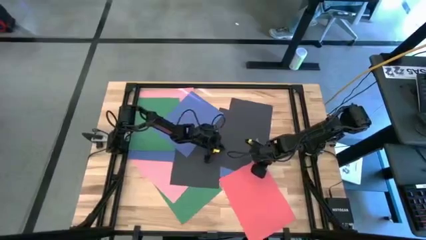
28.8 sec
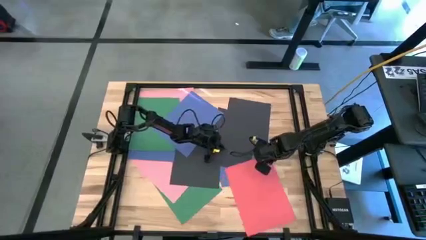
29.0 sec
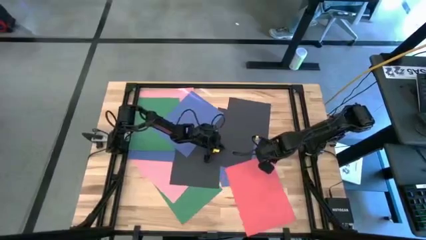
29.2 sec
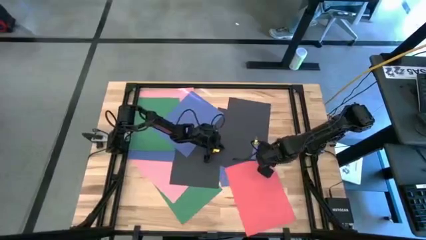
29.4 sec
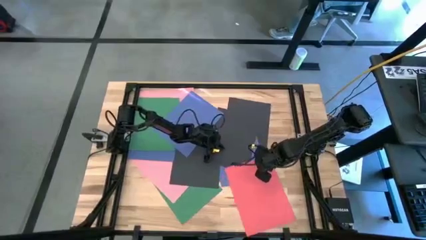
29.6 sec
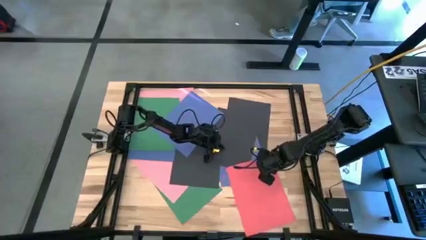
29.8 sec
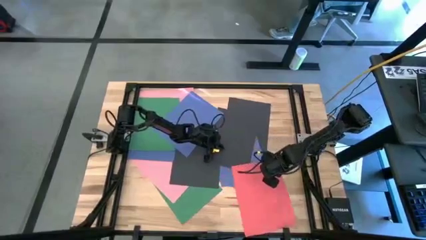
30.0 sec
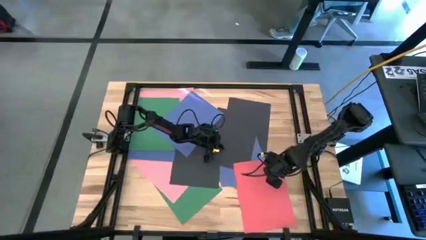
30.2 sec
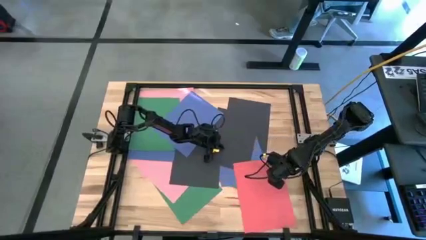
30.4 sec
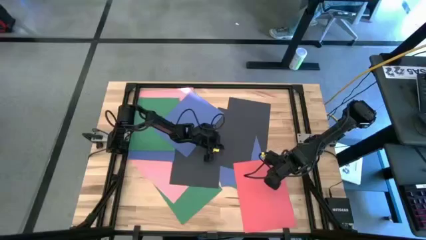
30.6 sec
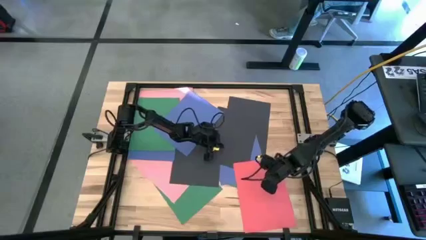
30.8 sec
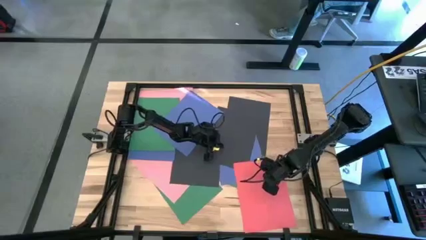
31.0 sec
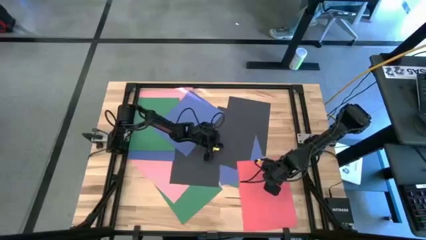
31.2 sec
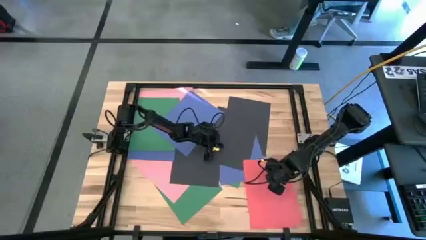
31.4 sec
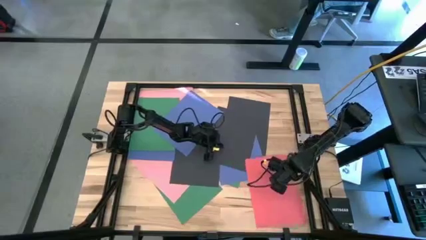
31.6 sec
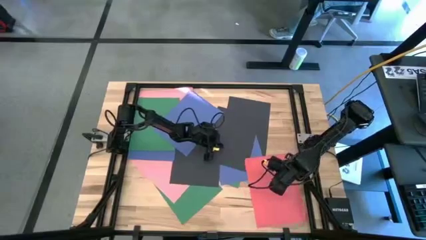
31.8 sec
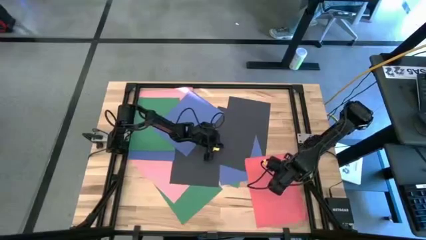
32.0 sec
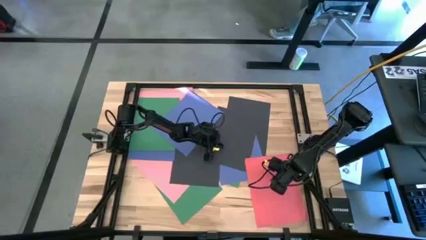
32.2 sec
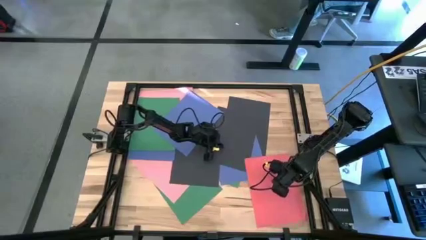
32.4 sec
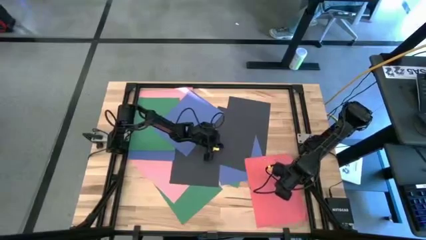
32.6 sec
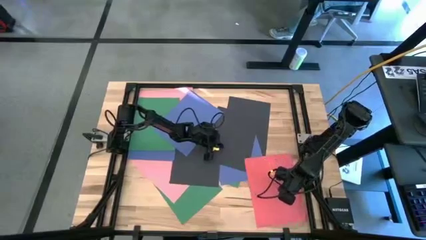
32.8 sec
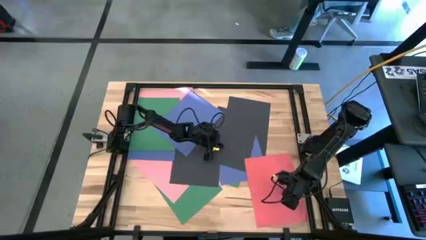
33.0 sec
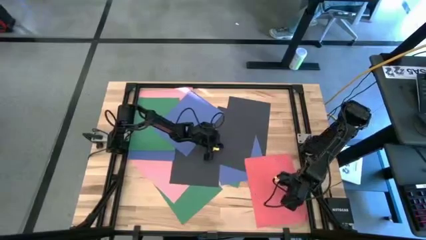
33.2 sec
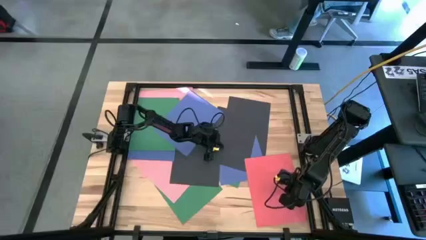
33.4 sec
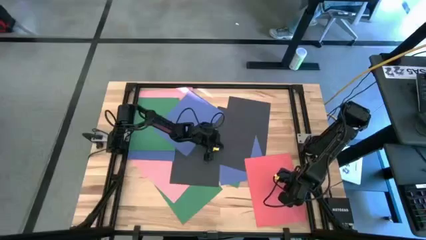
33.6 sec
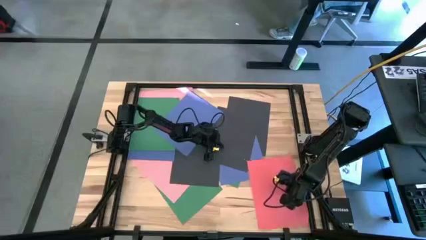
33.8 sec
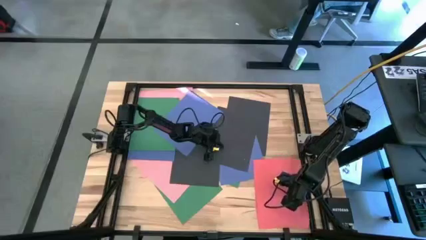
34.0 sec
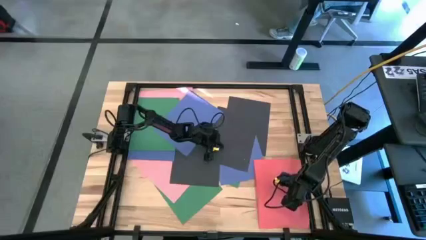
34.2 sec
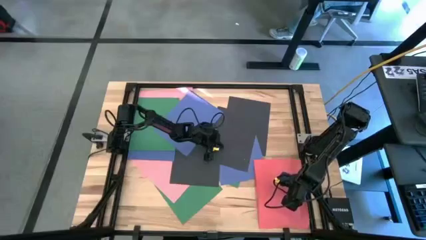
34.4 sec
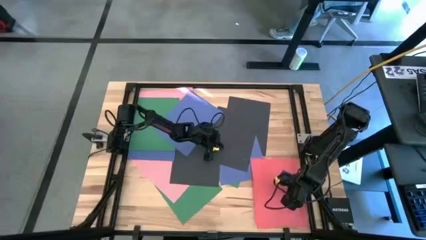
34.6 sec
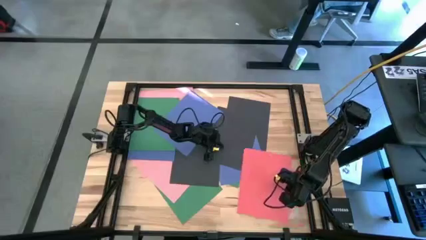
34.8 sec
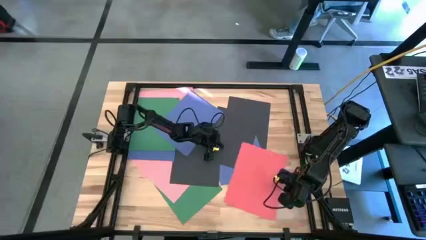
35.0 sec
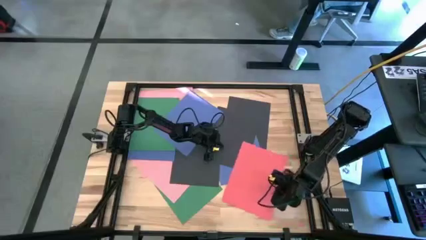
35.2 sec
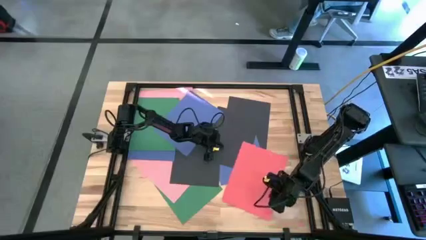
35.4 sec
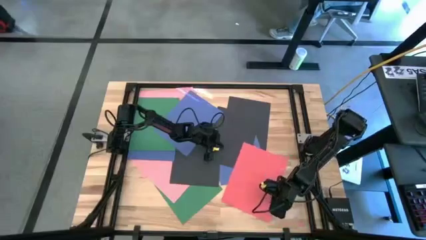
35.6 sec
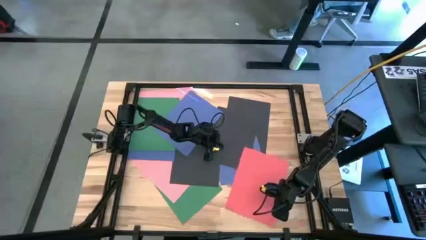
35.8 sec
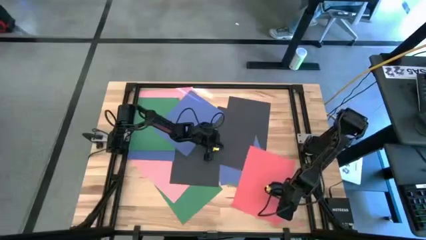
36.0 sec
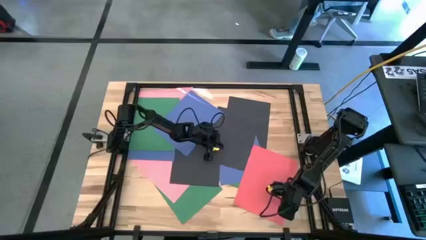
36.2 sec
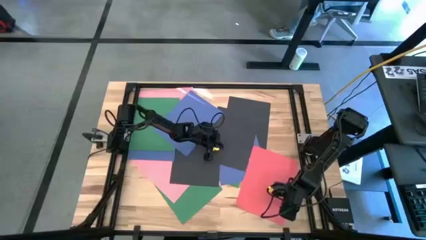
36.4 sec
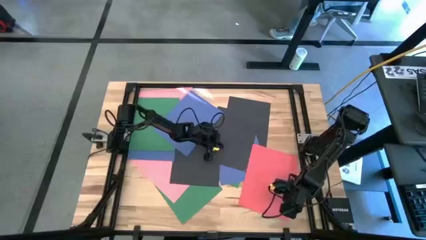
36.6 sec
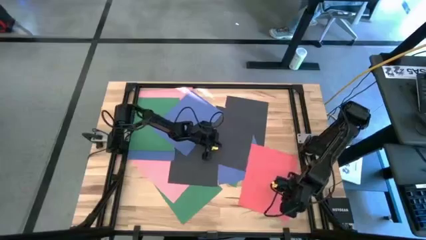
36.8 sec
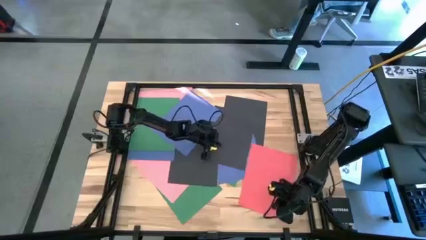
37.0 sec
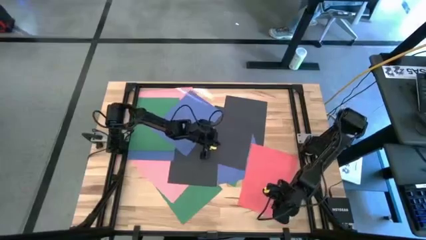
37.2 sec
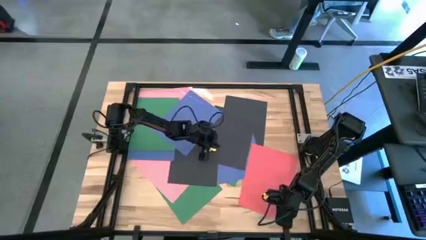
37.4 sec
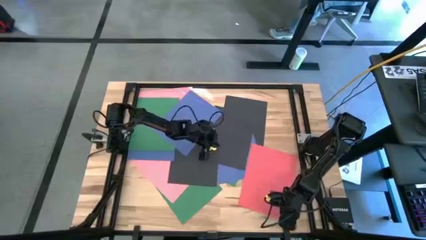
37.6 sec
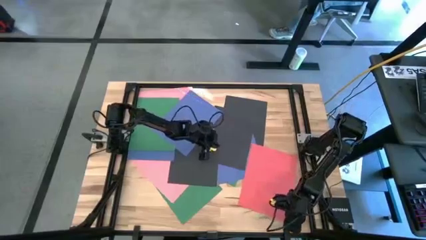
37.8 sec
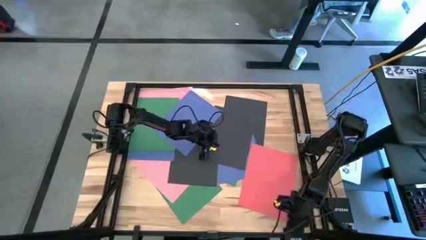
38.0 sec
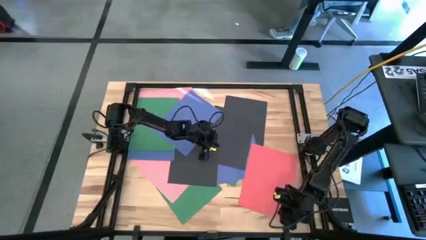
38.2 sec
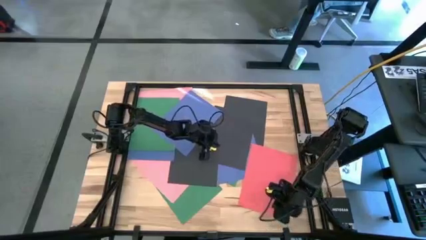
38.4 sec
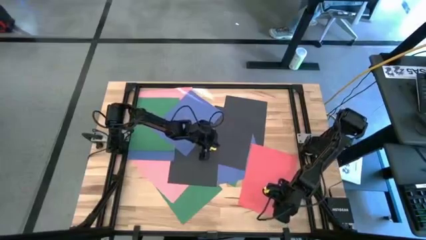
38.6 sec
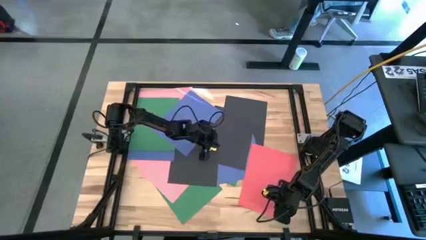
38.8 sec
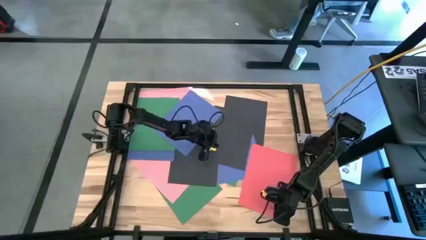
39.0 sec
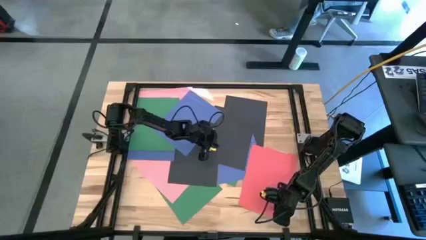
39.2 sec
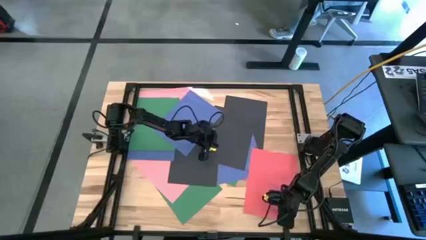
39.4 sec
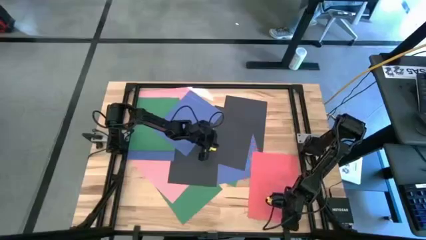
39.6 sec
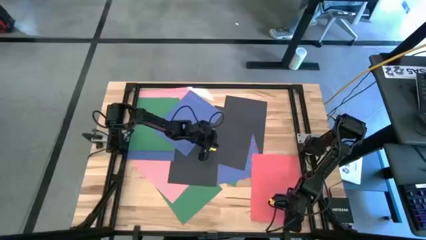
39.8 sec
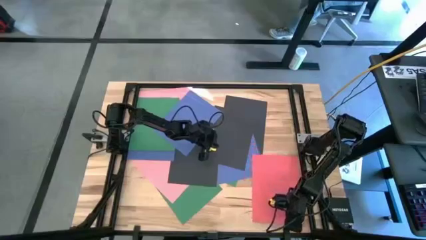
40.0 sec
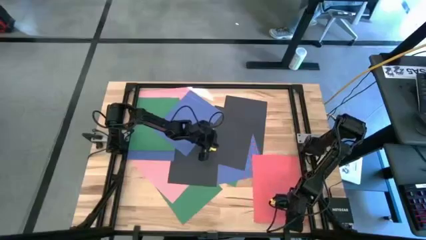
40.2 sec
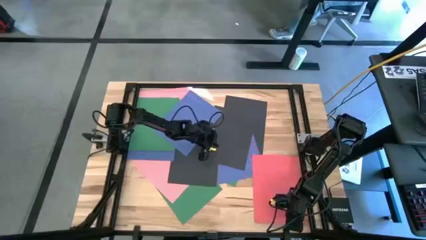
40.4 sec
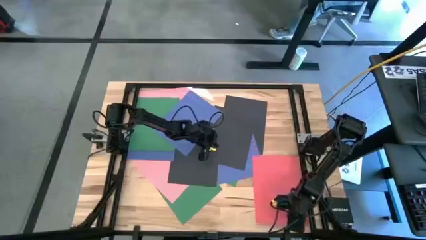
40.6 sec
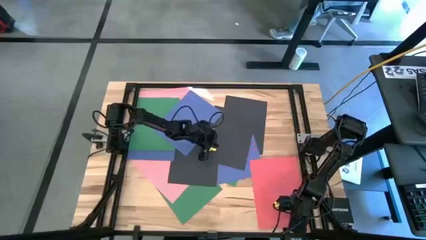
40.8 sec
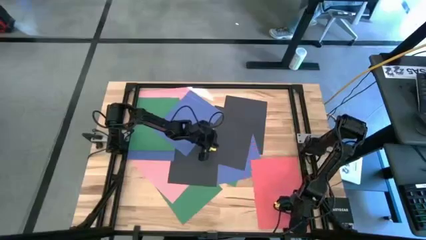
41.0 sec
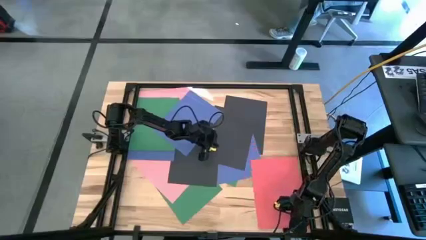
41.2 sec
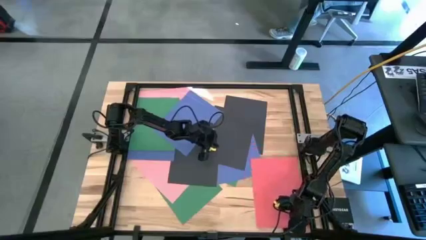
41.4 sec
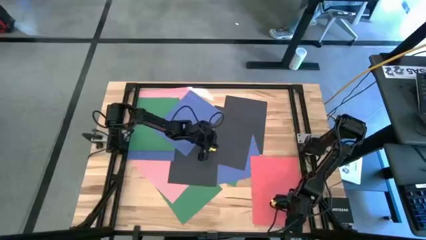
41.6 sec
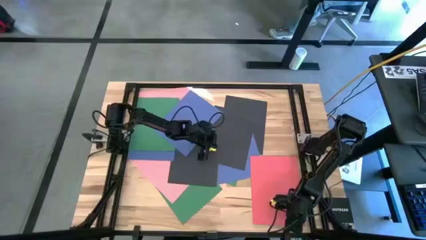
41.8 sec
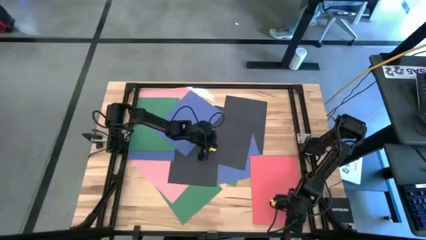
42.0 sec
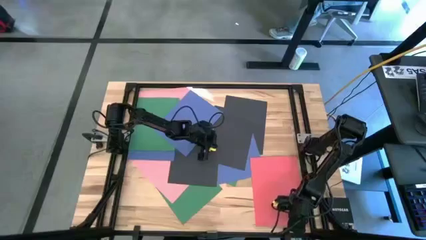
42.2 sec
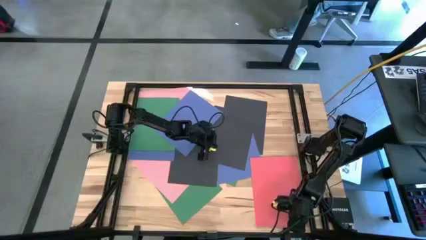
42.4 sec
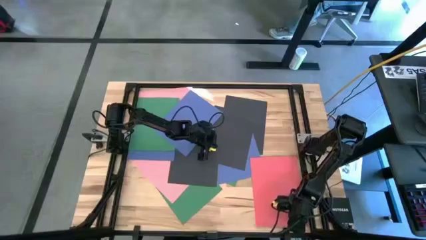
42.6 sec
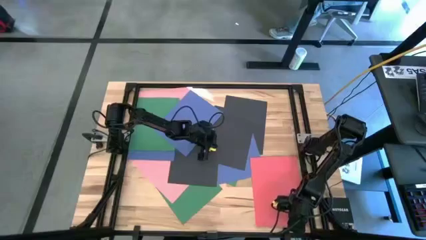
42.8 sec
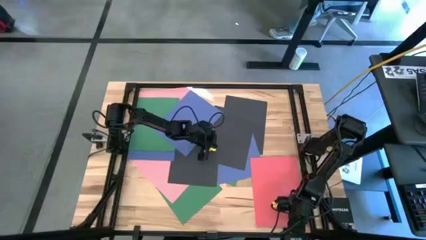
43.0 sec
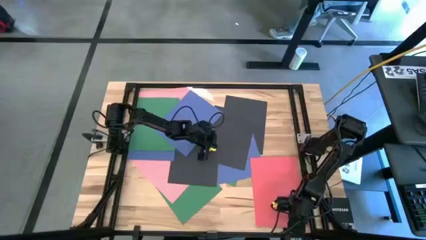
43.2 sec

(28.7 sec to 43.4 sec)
Task: Organize paper
Move the red paper to the bottom right of the table

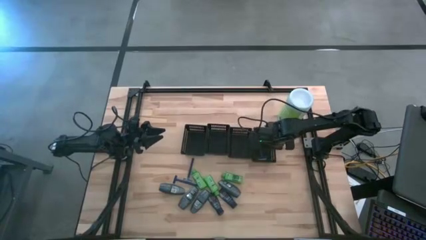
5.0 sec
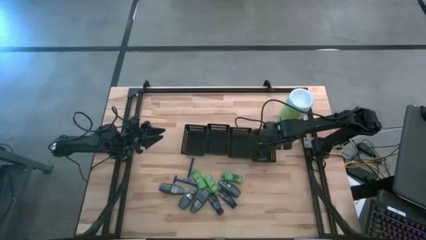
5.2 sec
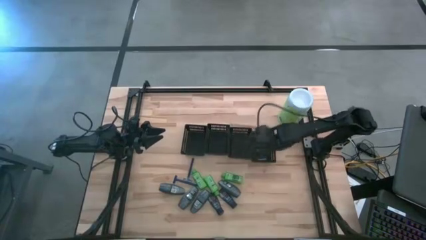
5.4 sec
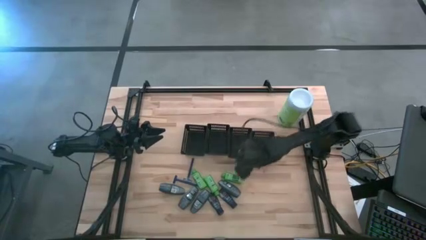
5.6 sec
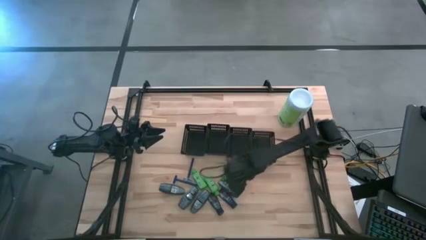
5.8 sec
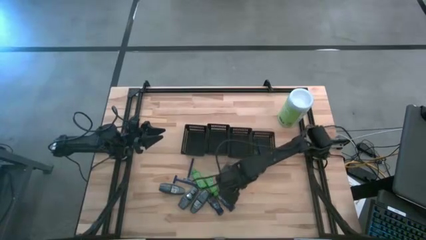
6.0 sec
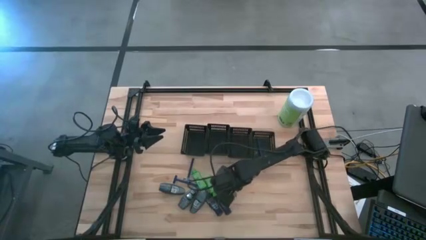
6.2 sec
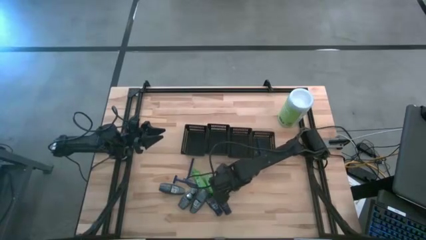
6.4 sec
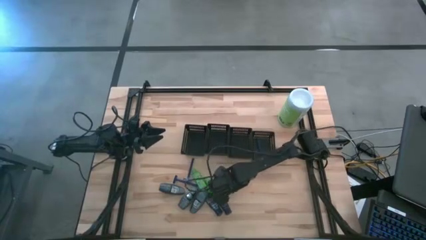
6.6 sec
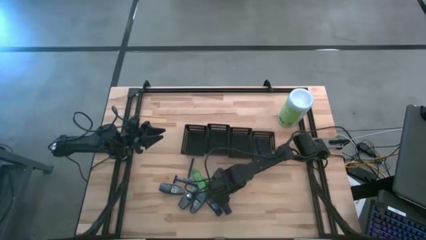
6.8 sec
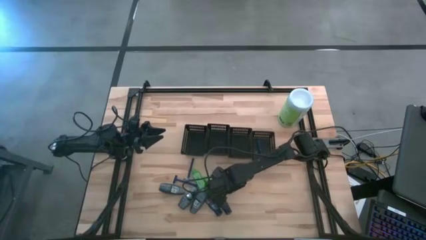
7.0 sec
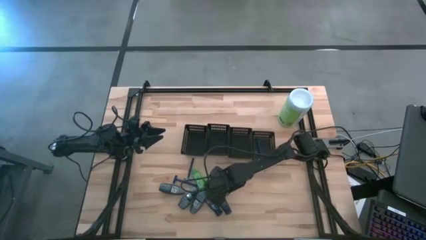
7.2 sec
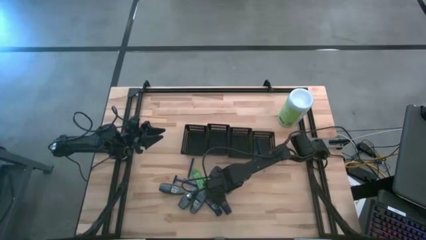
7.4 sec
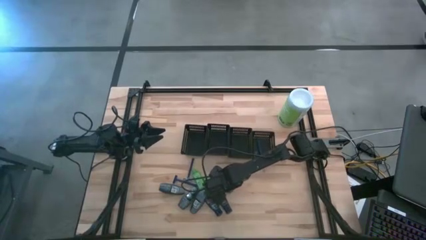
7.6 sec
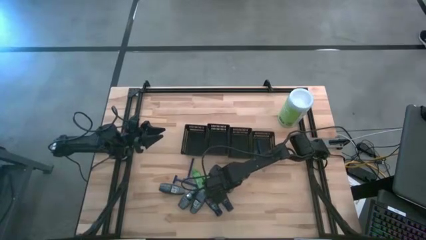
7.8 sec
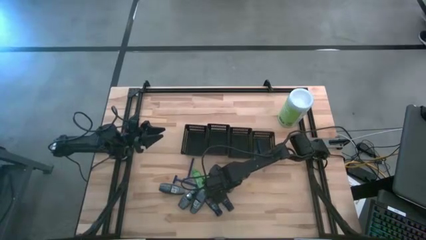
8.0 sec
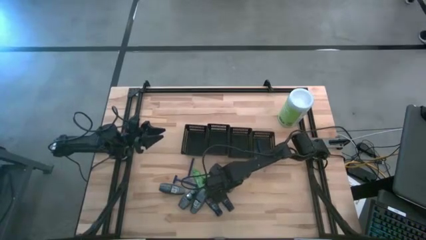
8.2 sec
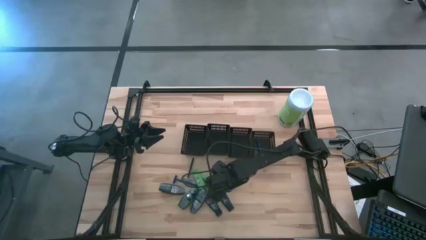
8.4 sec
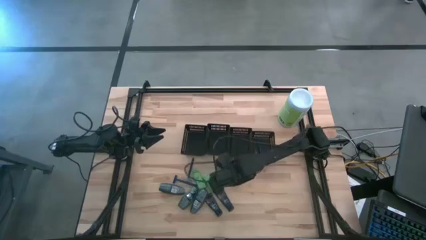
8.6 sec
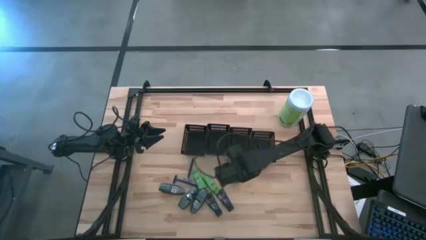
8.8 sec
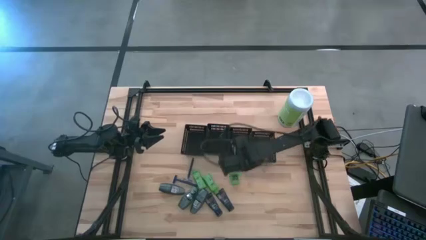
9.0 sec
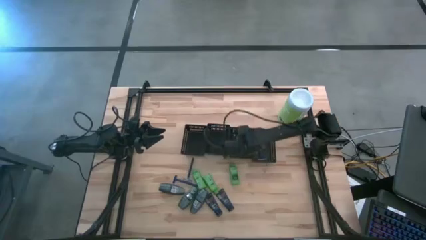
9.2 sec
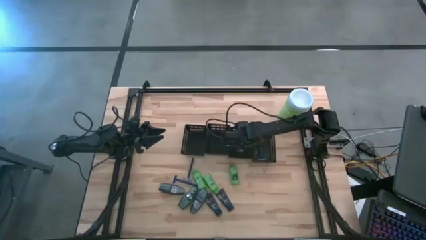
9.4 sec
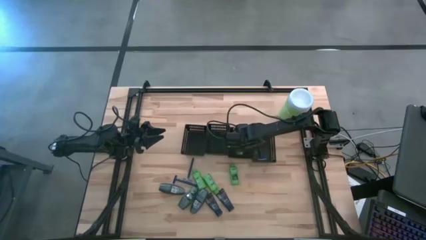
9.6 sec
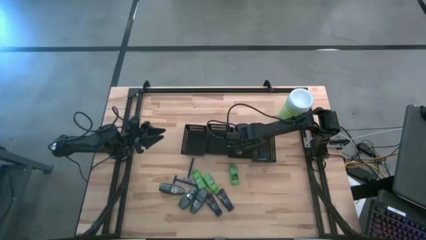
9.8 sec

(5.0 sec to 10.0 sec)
Task: Pick & Place Travel size toiletries
Put the deodorant into the middle right black bin
